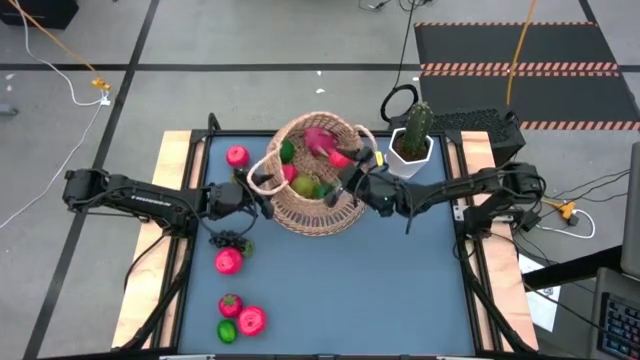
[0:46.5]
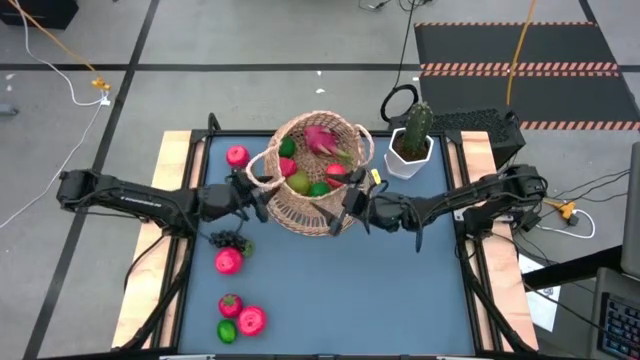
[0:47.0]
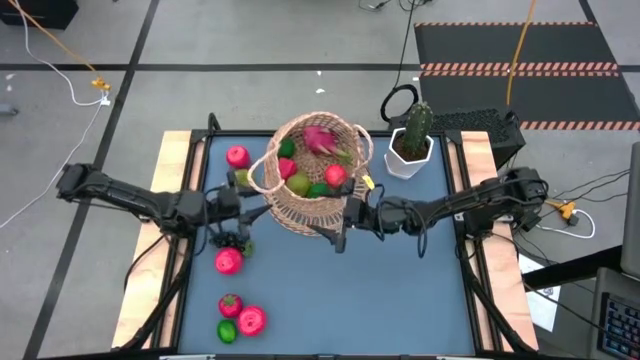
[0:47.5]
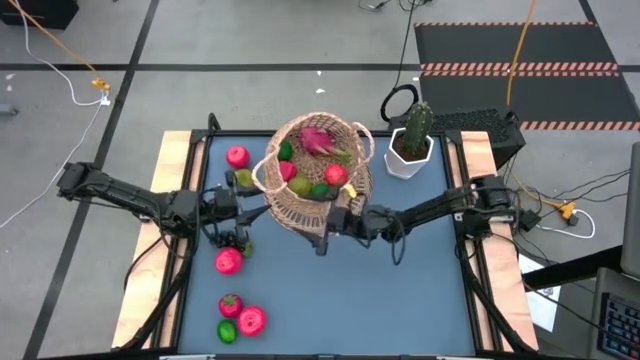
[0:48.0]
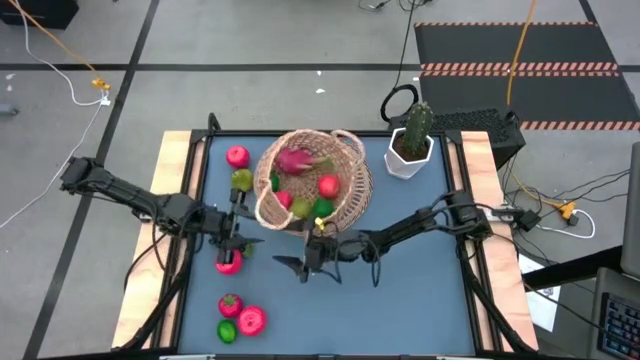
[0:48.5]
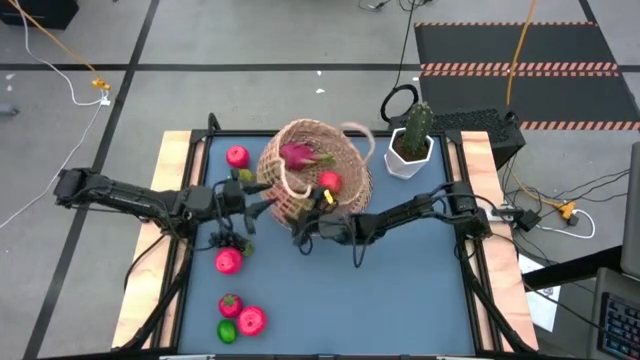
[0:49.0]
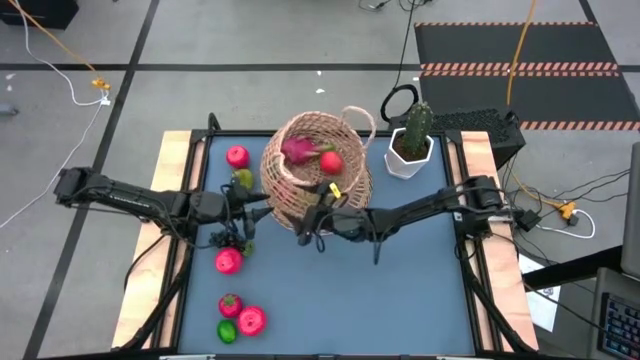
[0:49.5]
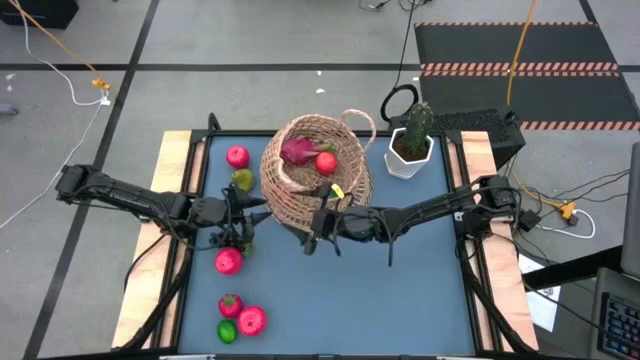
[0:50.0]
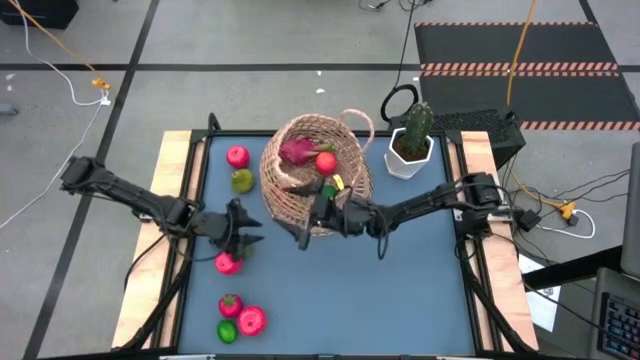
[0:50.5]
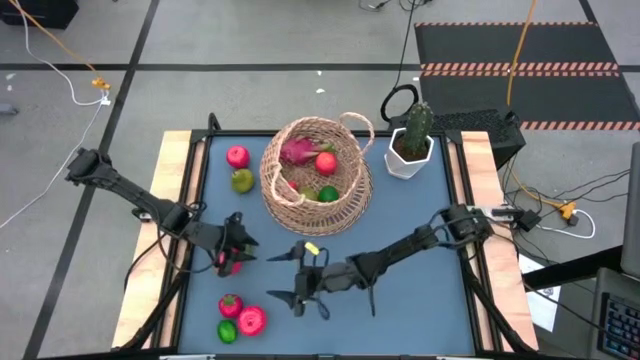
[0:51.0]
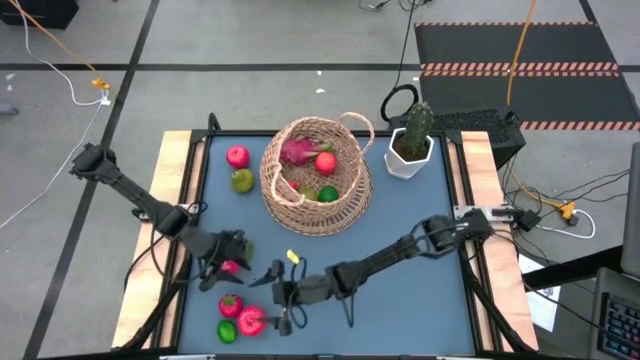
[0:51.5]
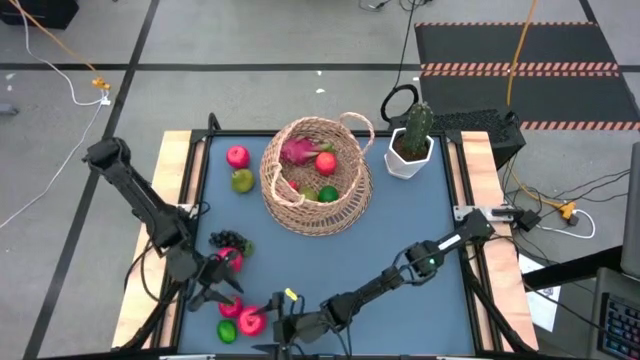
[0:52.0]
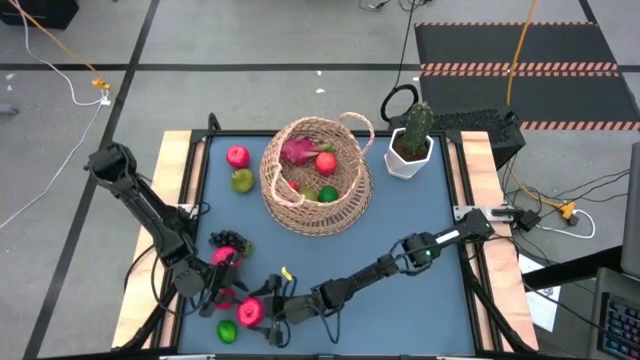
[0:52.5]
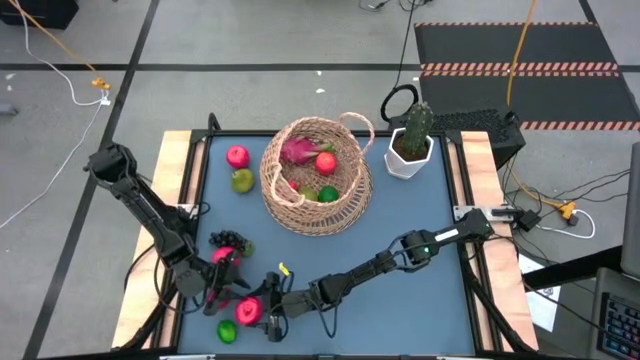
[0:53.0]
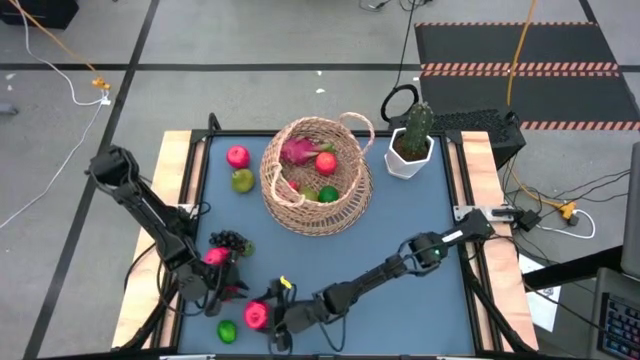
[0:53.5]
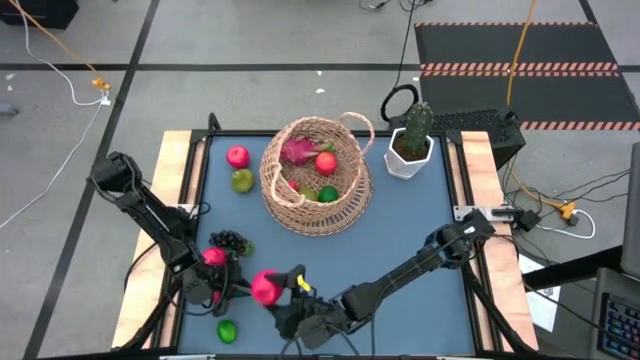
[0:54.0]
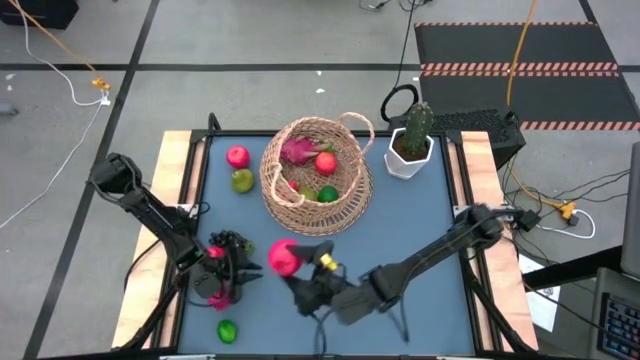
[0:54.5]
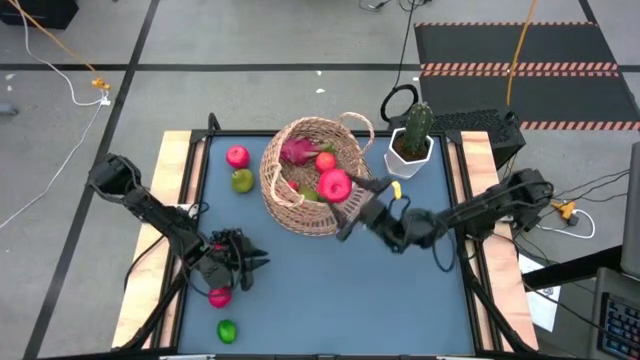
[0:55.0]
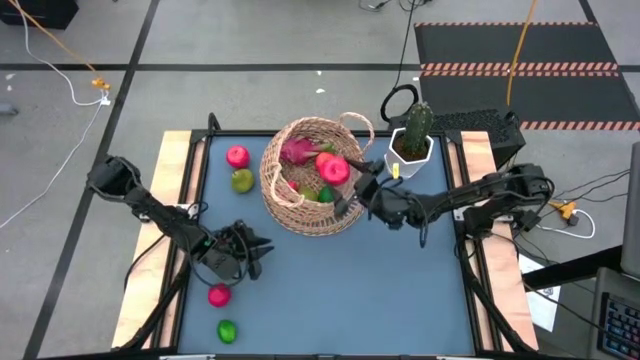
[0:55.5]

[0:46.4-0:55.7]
Task: Build produce basket
Put the apple into the brown basket

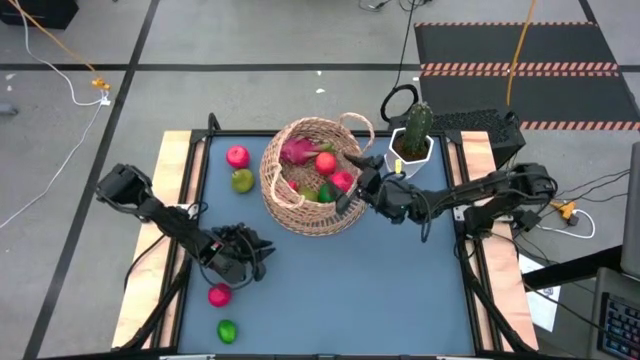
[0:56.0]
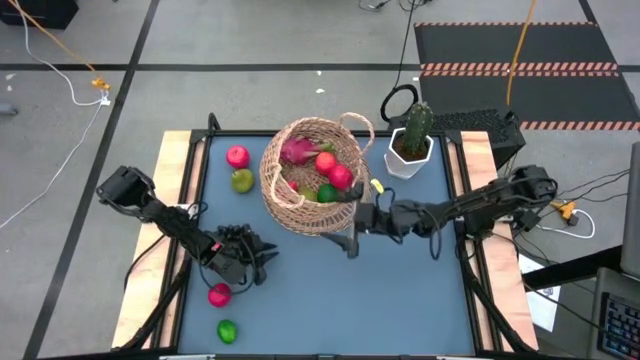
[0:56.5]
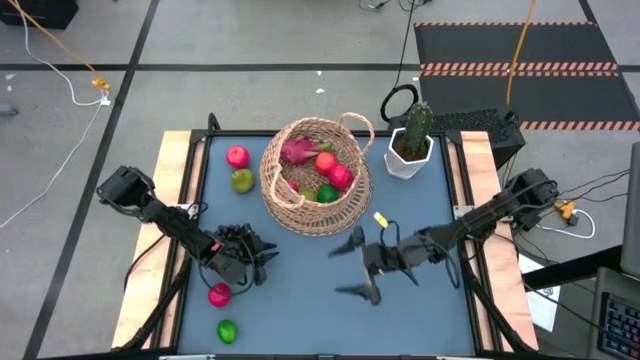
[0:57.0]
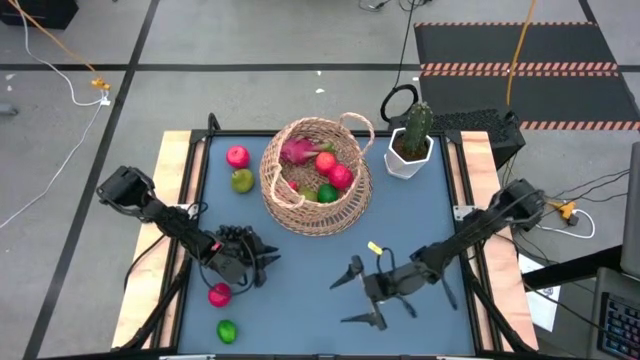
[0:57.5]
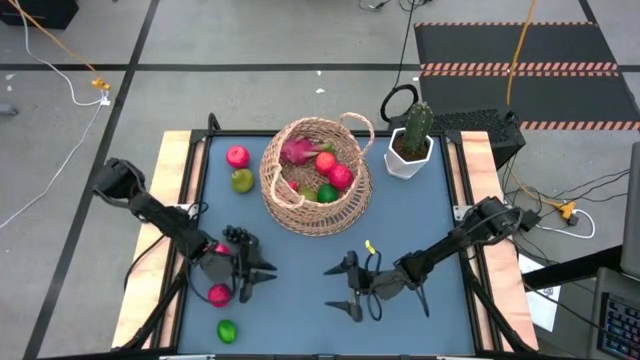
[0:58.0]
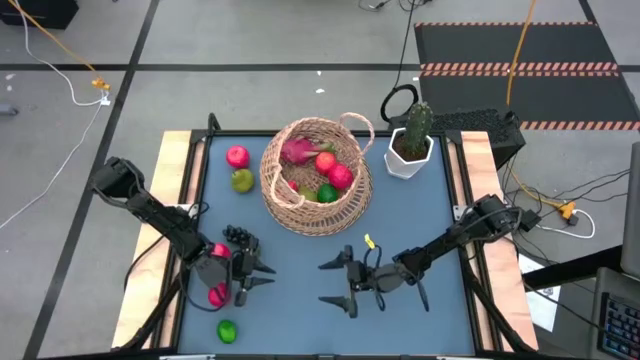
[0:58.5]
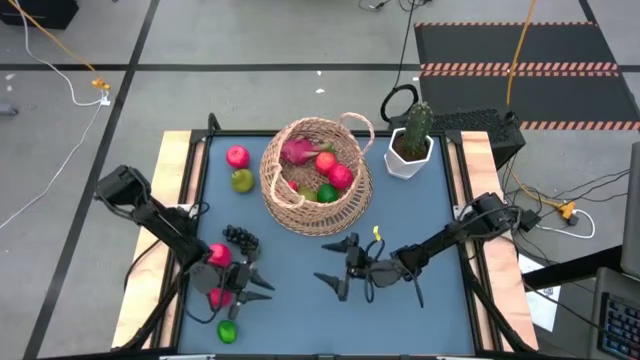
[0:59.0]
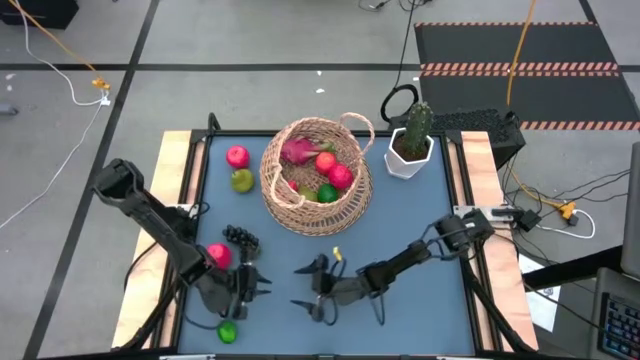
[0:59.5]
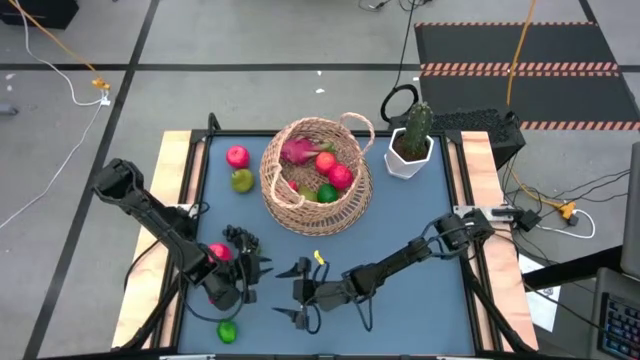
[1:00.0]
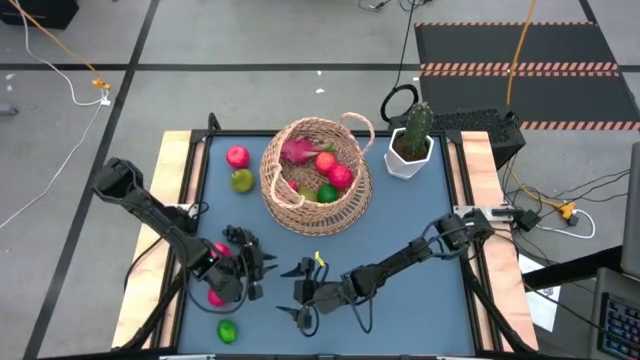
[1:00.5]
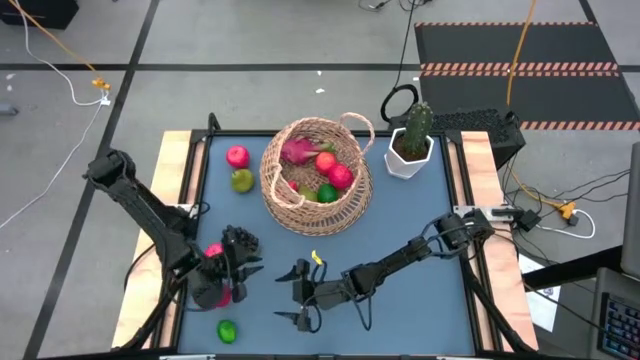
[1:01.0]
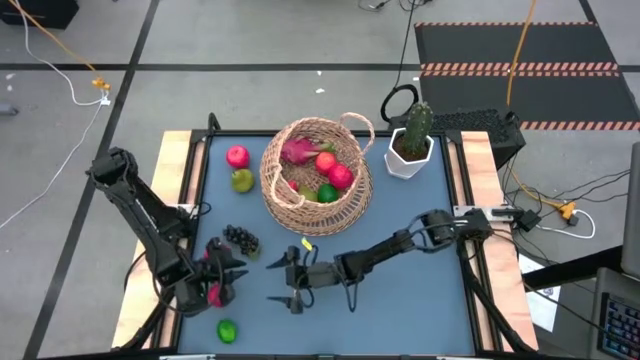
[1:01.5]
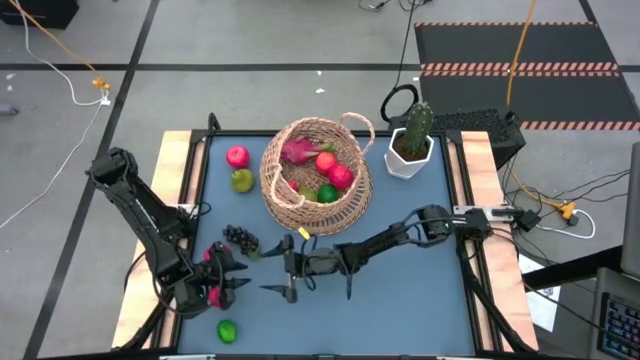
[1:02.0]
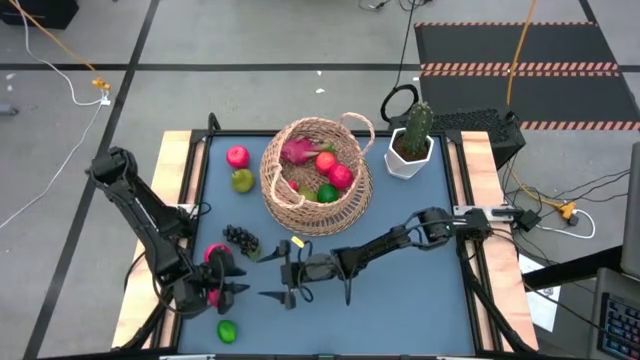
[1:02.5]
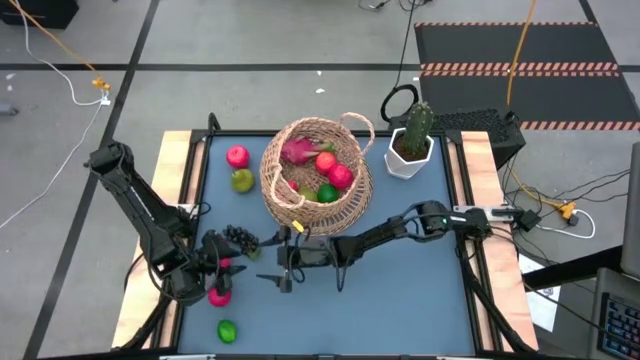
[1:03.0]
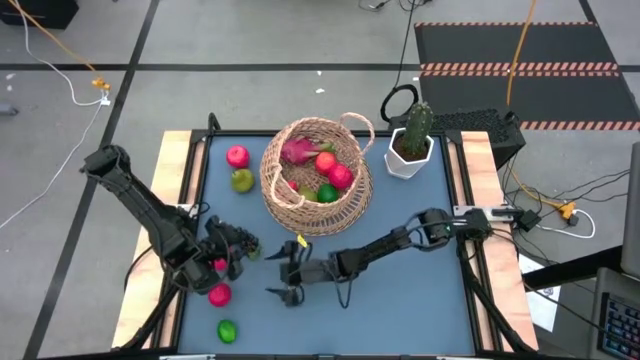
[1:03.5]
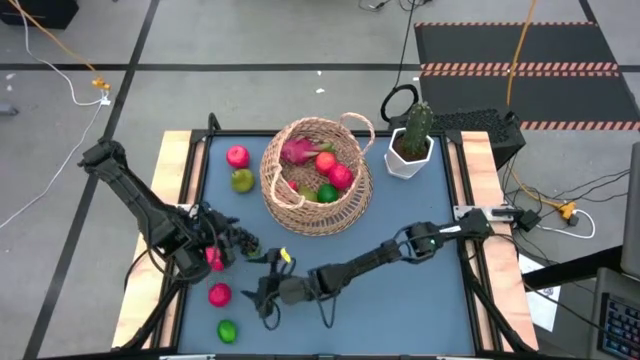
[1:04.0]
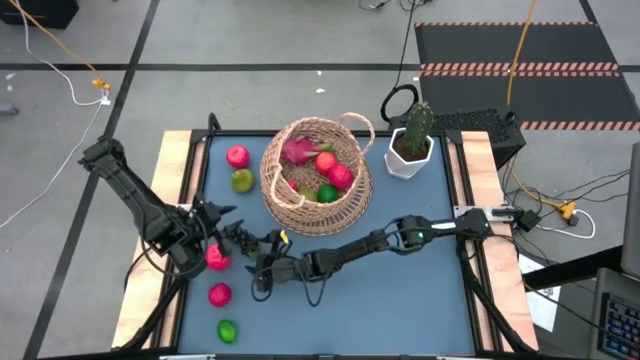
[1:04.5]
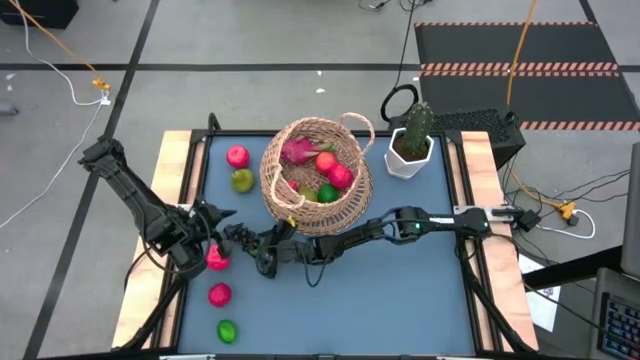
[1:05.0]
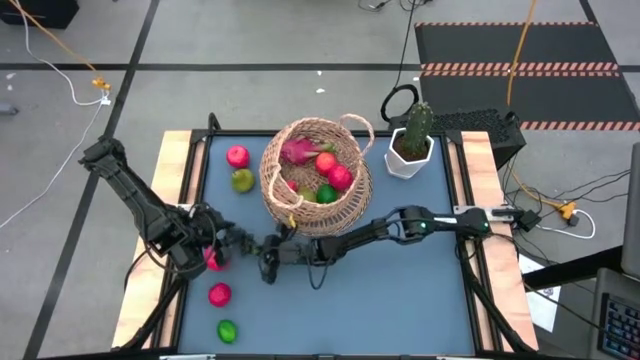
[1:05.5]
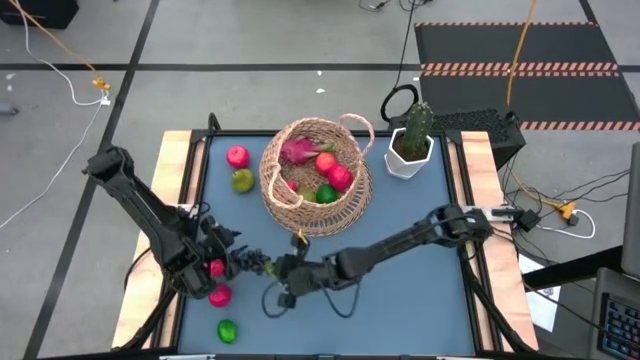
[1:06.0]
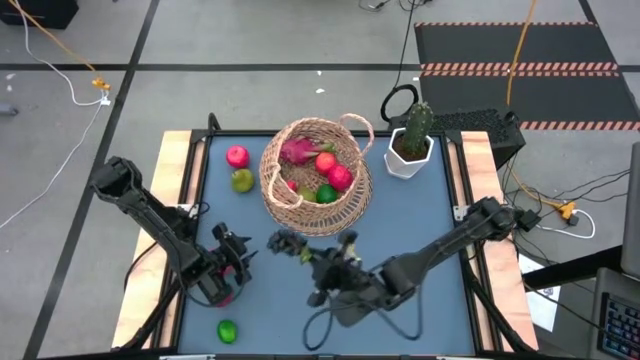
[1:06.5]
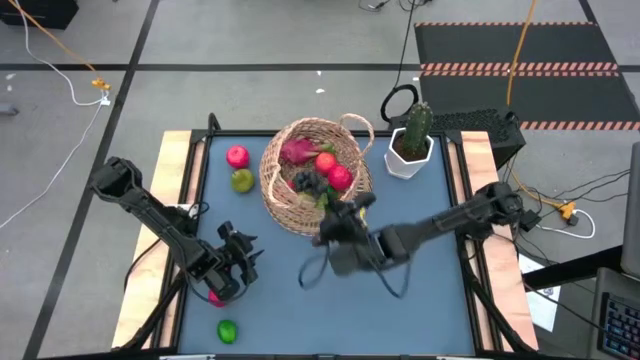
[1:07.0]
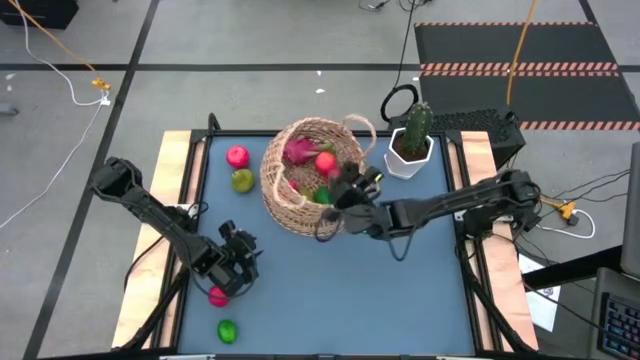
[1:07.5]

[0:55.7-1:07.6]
Put the grapes into the brown basket
